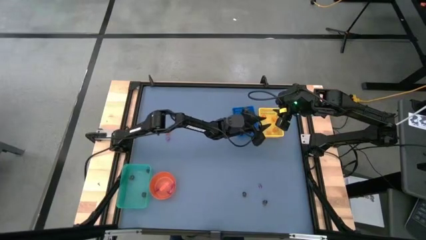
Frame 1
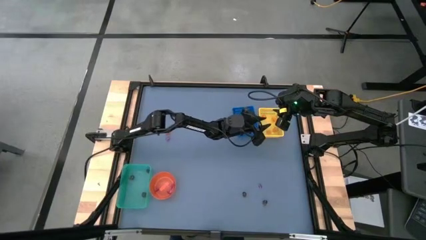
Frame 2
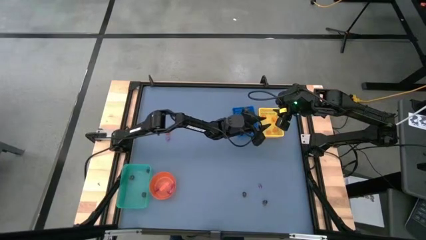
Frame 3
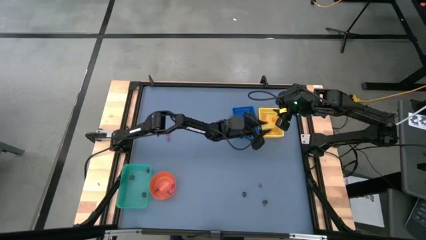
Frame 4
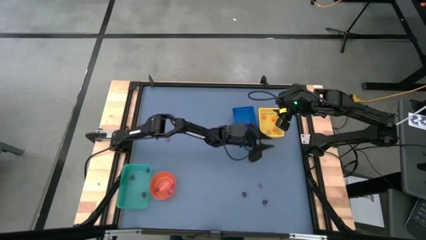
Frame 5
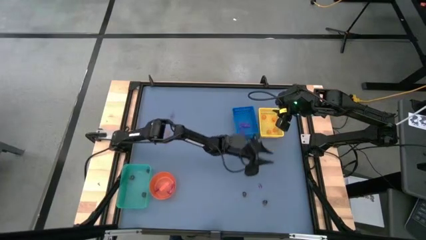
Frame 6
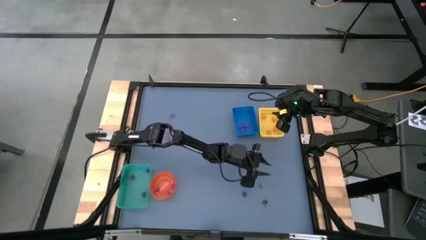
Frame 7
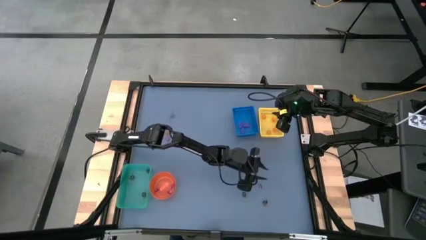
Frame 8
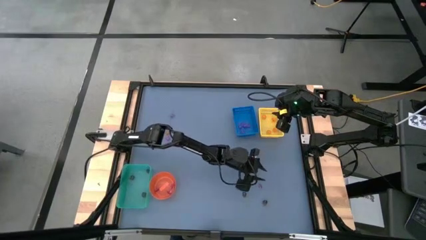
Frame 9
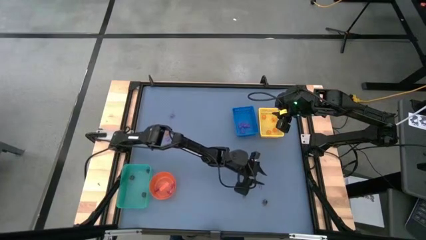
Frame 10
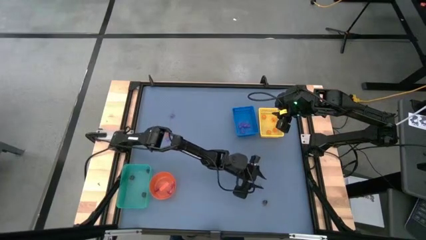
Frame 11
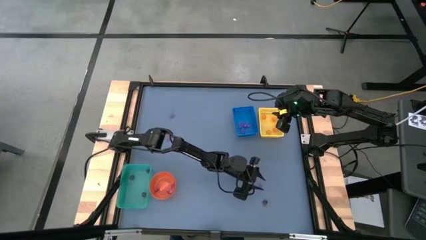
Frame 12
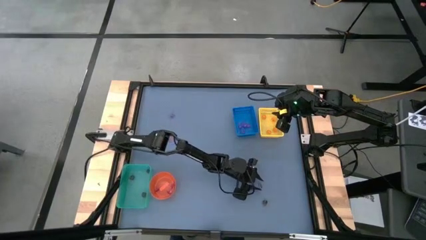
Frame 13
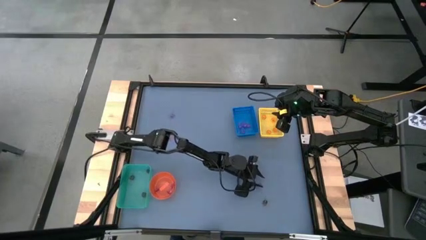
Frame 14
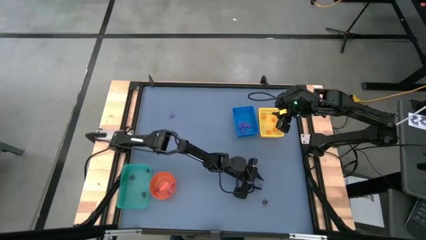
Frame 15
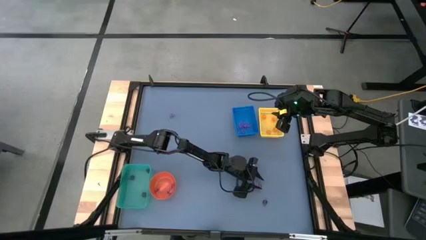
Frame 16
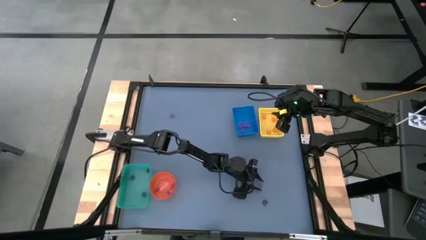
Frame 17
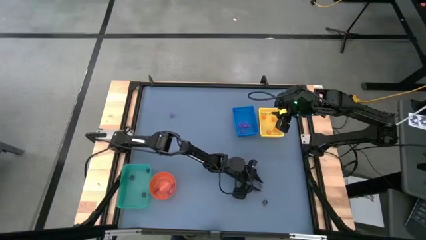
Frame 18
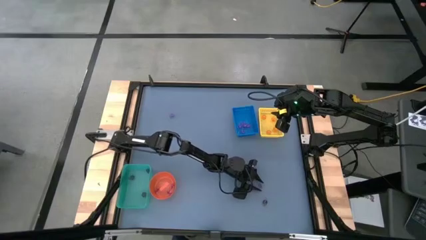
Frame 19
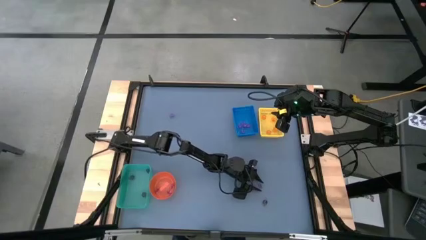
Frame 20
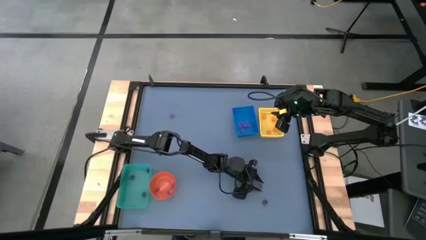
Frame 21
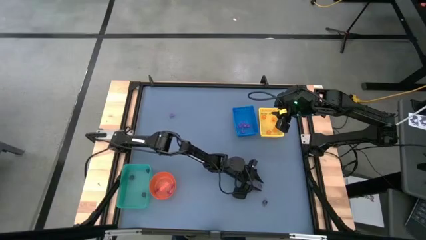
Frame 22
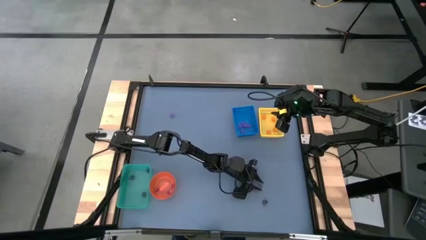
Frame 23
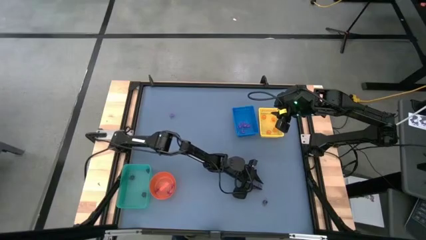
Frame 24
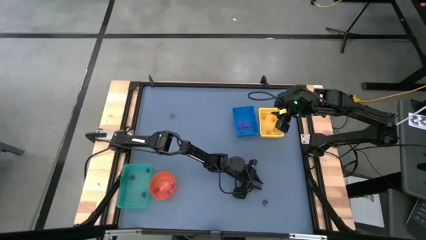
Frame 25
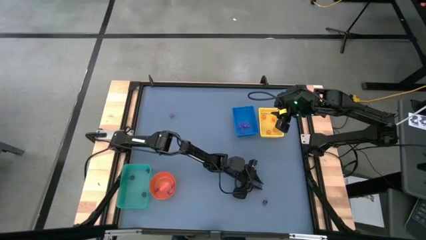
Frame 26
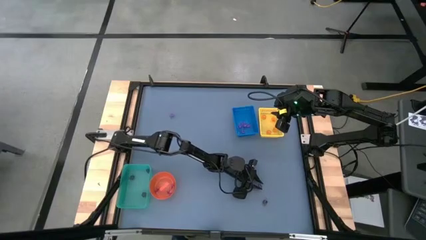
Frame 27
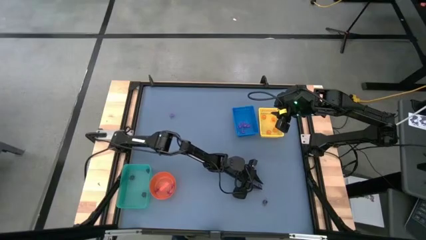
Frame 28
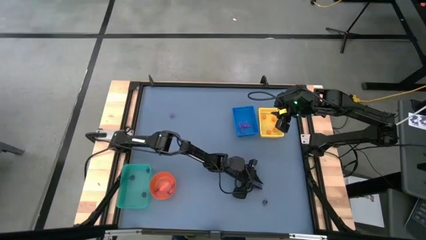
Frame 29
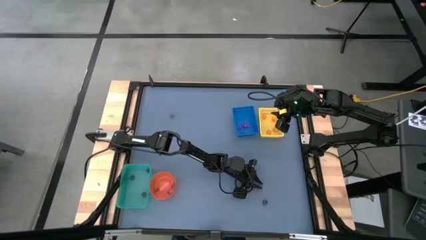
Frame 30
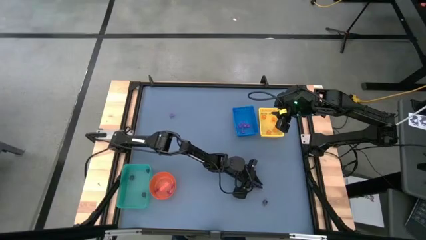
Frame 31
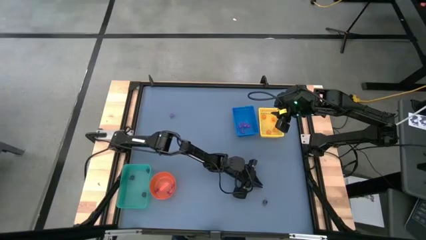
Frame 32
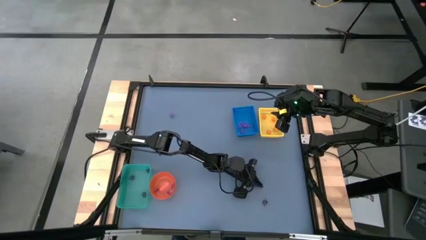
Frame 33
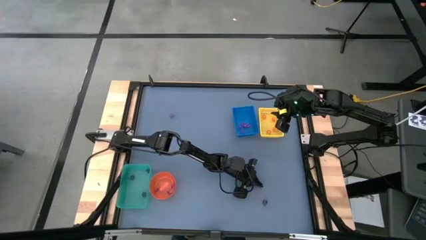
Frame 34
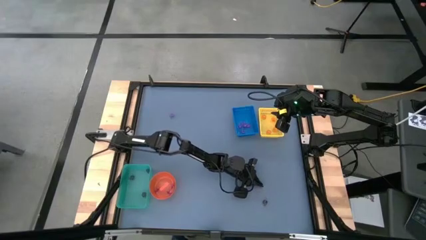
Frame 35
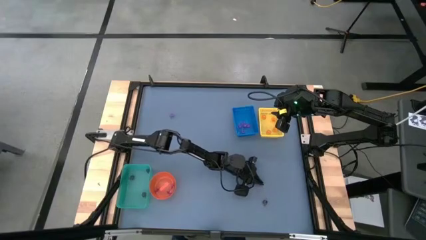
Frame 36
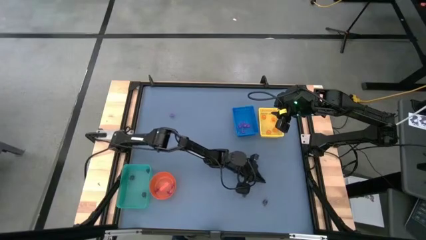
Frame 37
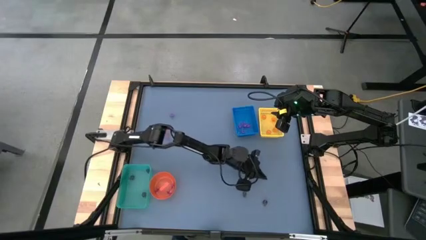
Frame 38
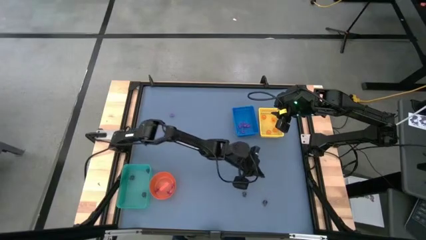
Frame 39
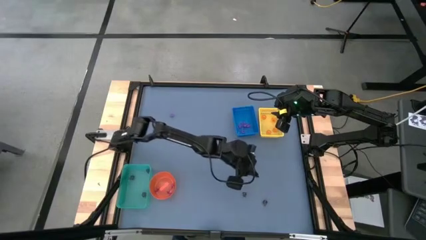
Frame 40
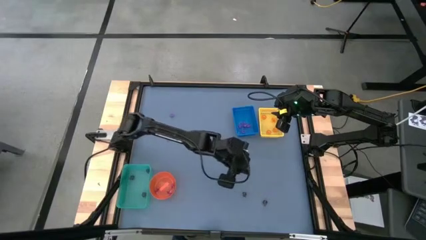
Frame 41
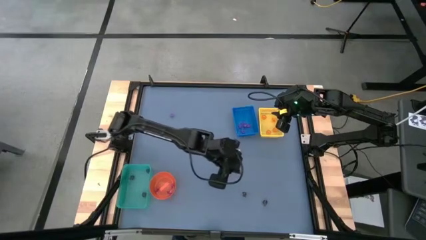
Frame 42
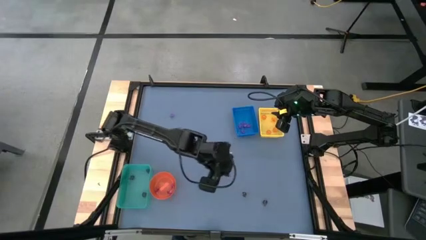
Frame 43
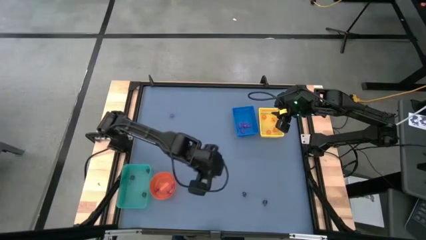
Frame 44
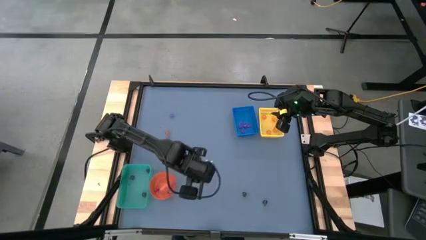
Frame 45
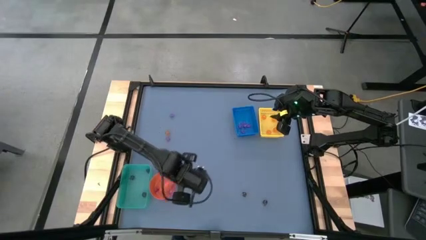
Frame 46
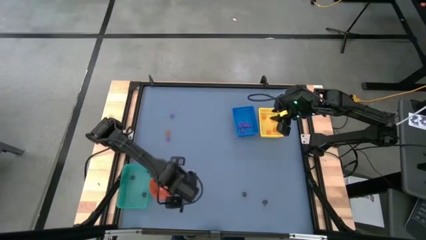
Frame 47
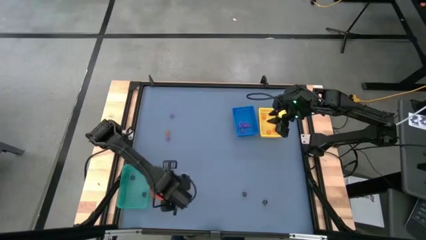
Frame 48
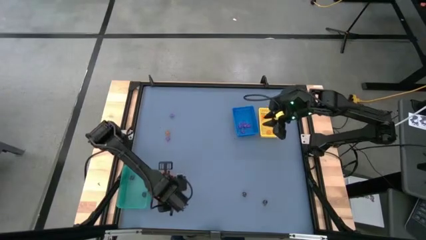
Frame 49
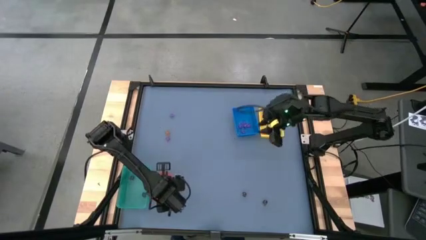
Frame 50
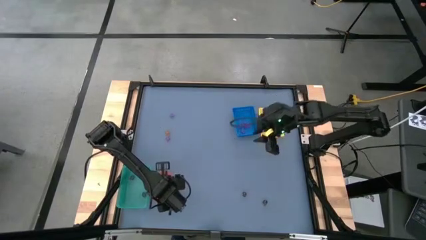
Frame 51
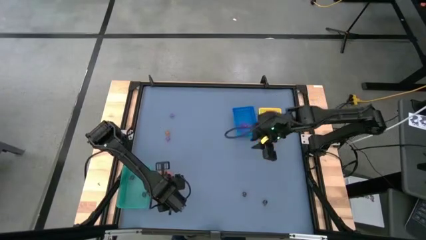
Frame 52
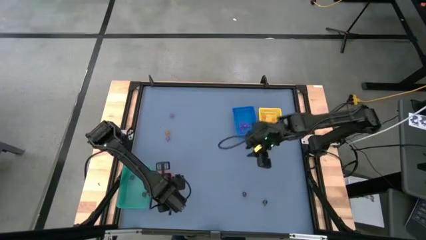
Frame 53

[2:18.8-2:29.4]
Task: Sort Halloween decoration
Put the violet witch hat toy into the orange bin

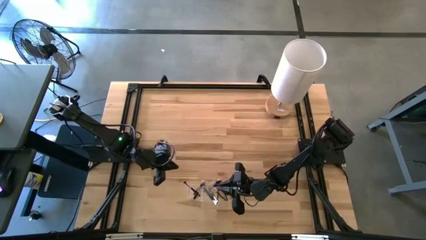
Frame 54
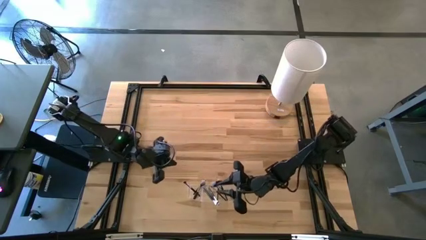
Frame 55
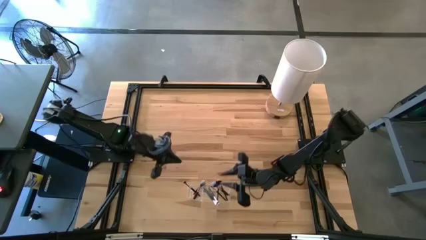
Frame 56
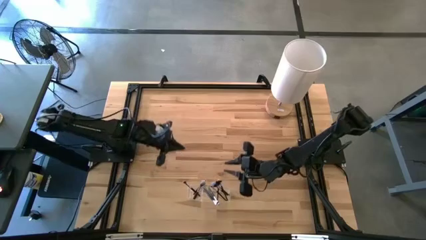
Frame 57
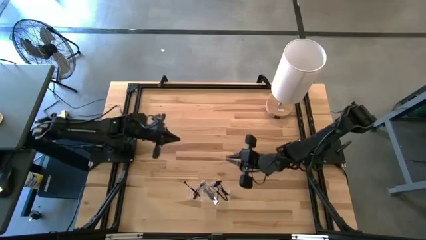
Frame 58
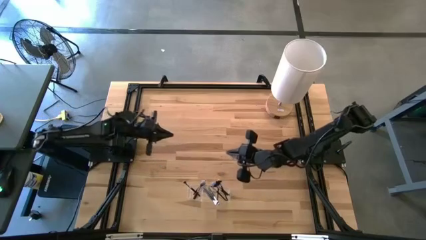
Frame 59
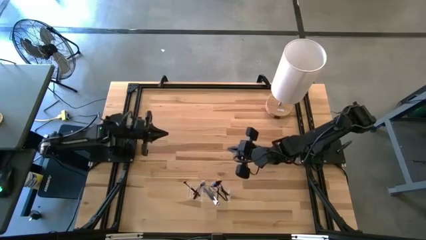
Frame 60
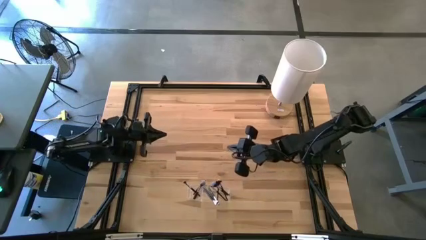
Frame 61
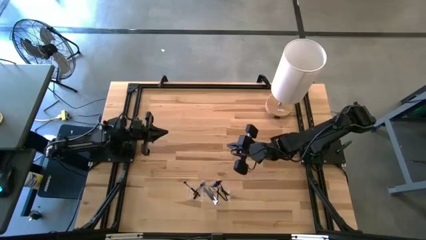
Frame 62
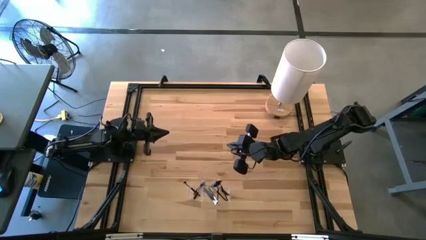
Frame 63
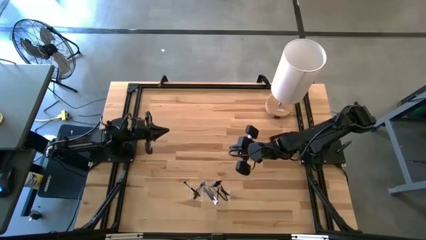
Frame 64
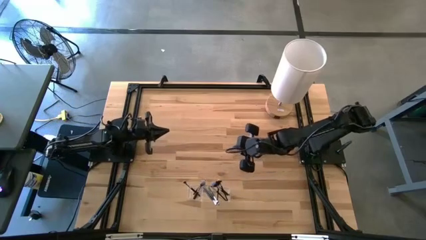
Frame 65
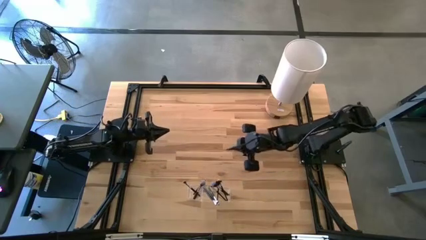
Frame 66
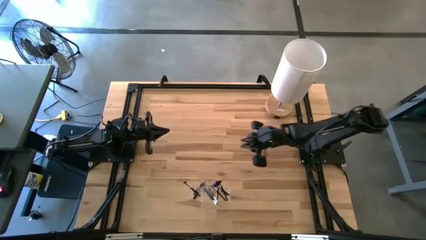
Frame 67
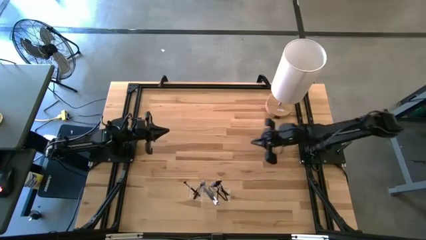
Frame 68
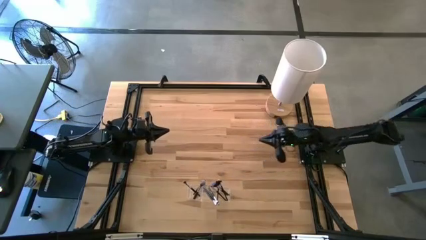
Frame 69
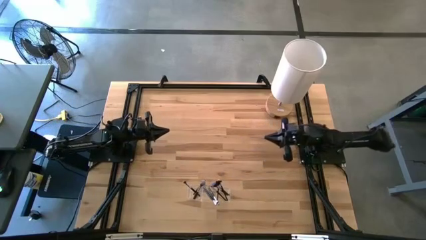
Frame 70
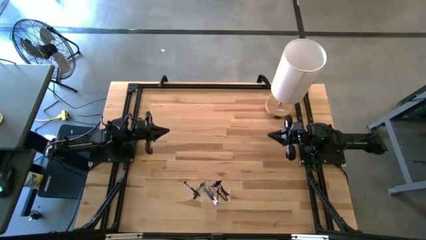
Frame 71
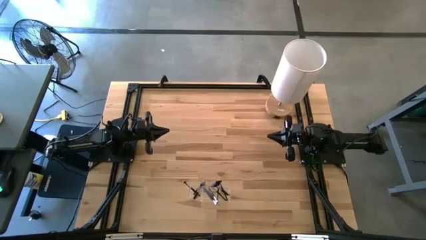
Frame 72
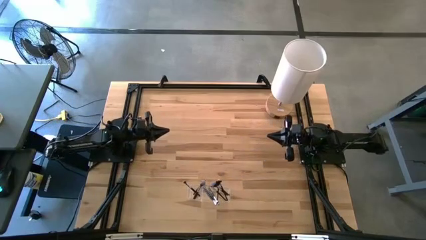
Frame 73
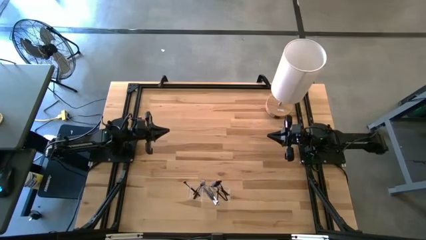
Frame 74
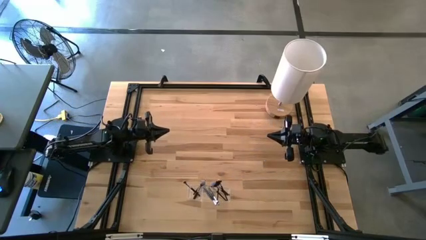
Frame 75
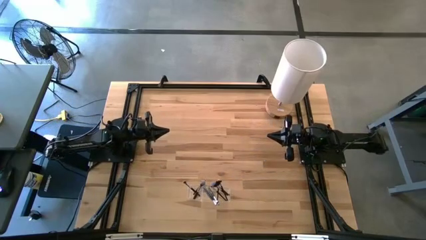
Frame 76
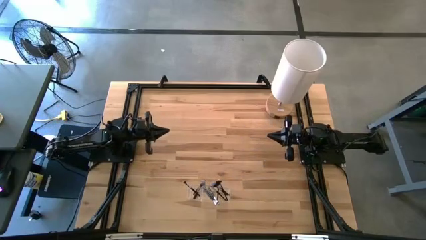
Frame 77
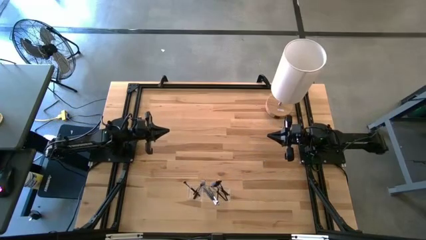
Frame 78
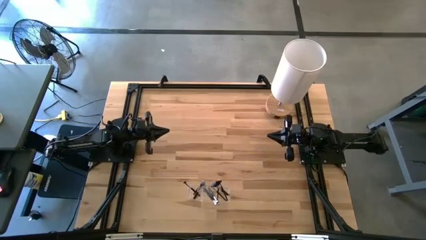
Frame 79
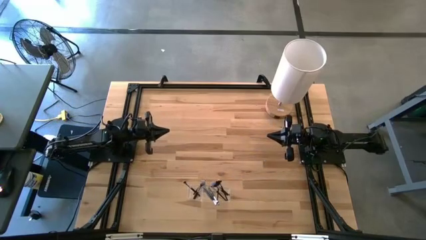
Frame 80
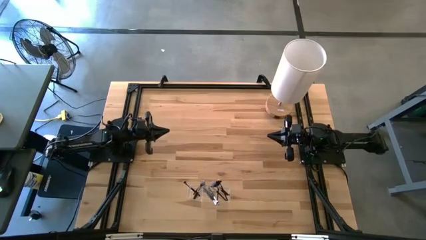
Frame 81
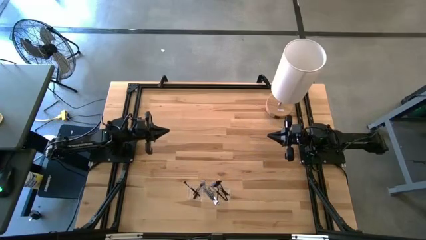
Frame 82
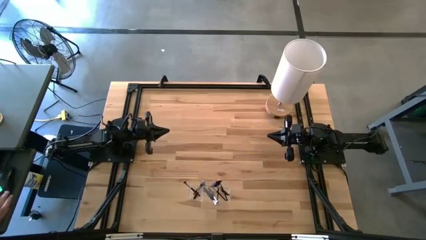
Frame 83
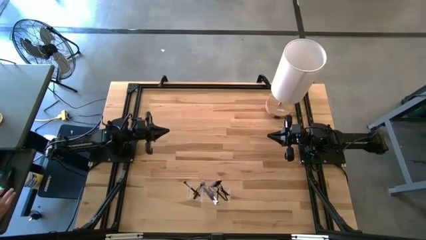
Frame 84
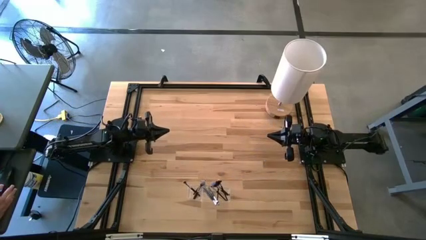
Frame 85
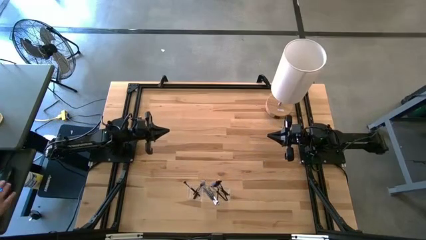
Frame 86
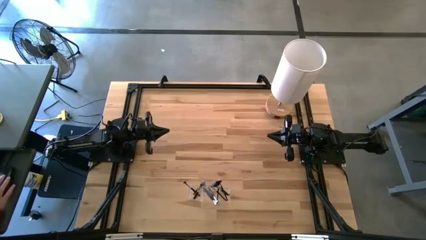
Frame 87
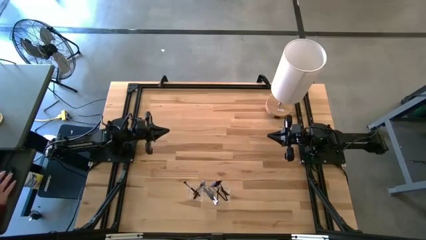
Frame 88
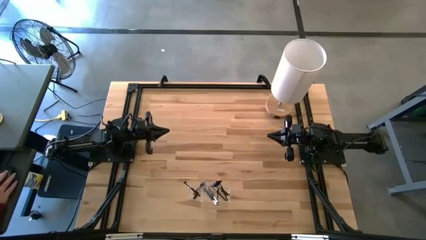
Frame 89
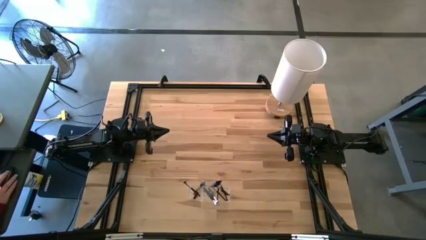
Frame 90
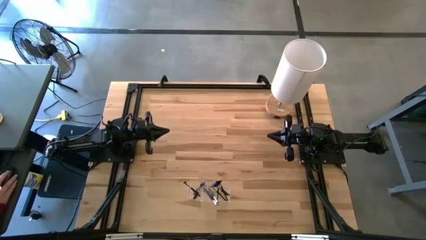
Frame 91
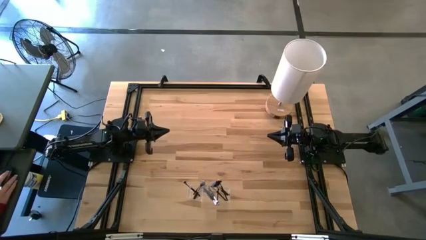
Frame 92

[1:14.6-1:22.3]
Task: Put items in baskets/containers
Return to Home Position
